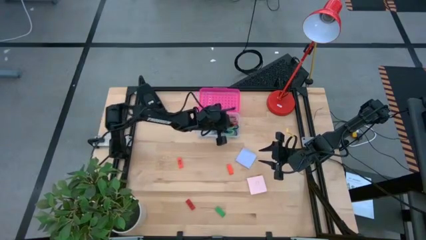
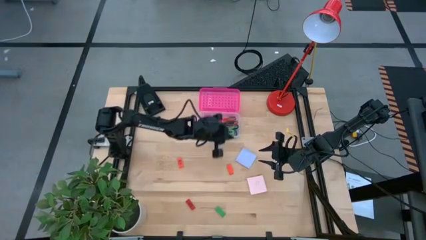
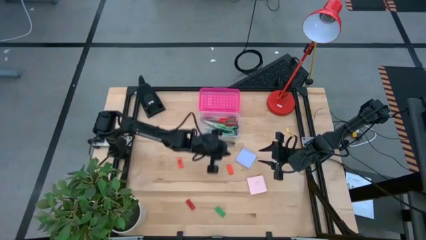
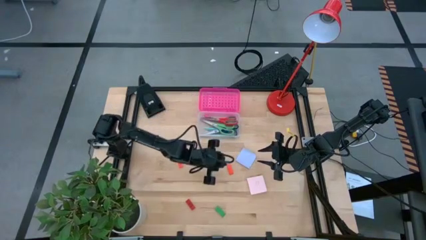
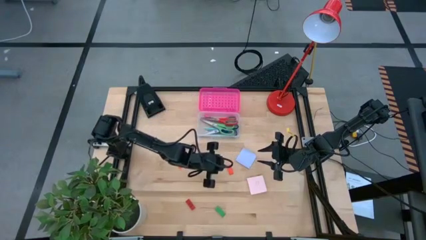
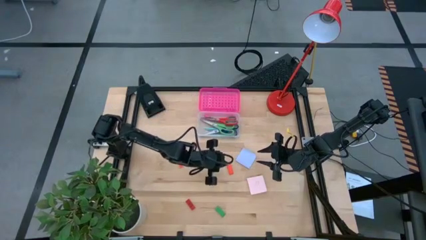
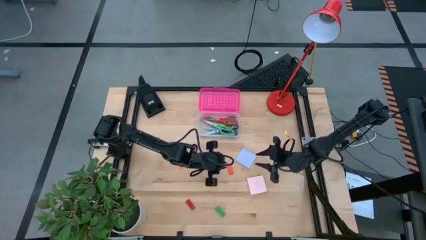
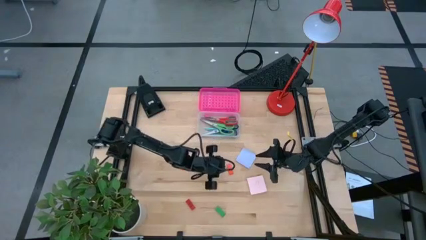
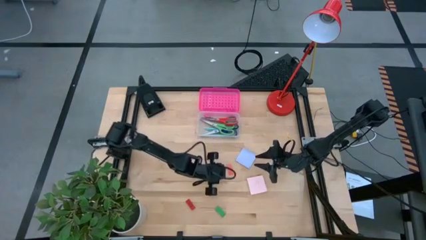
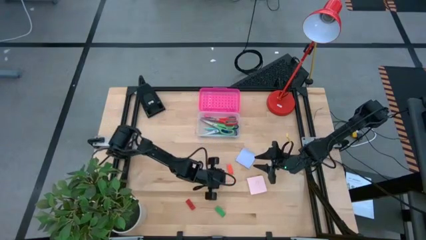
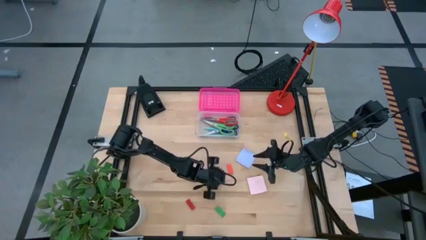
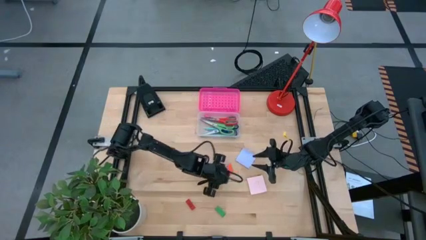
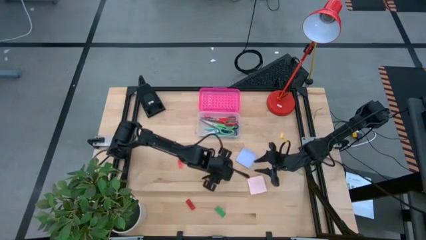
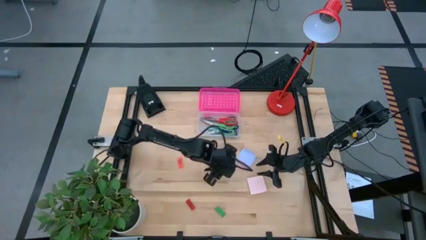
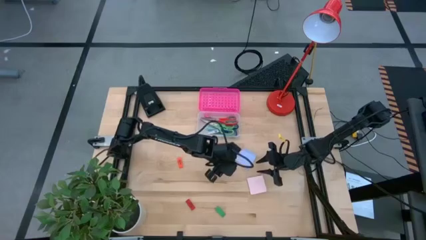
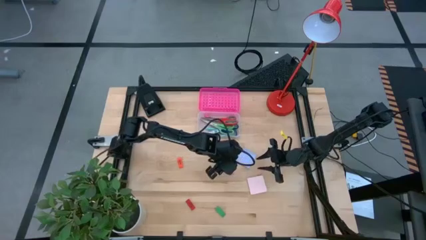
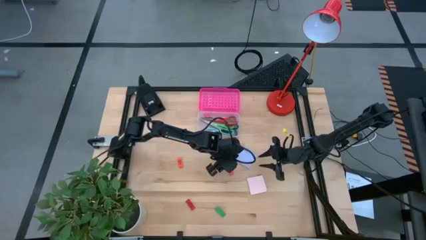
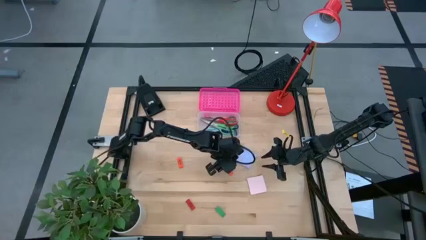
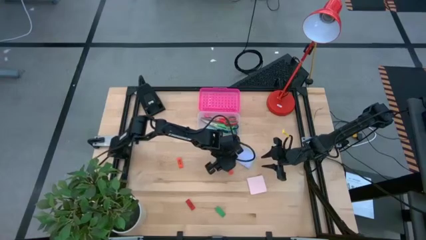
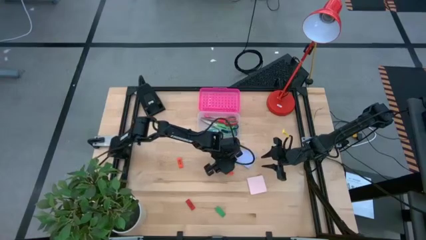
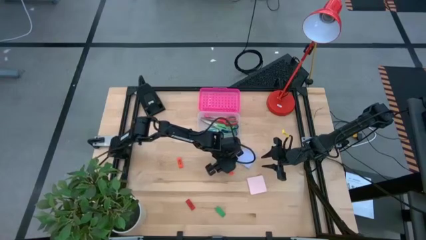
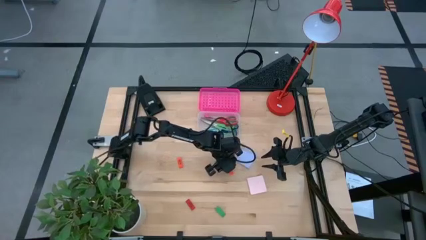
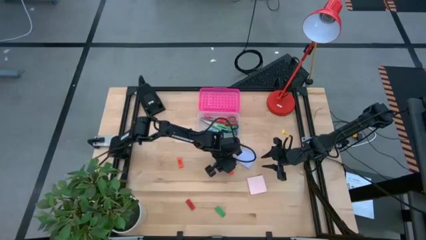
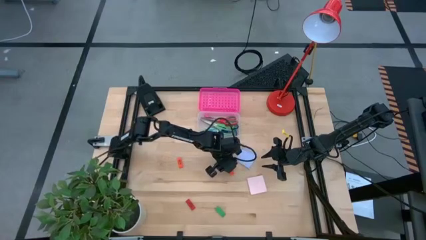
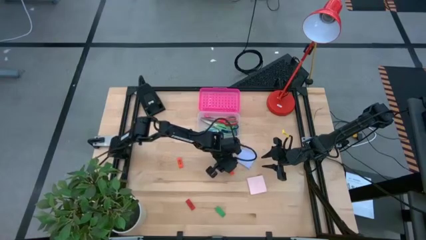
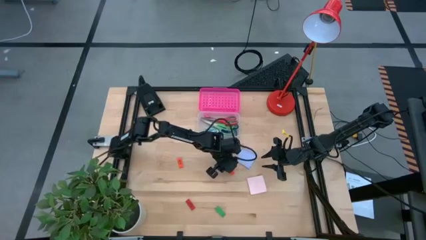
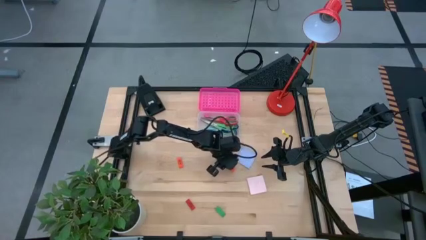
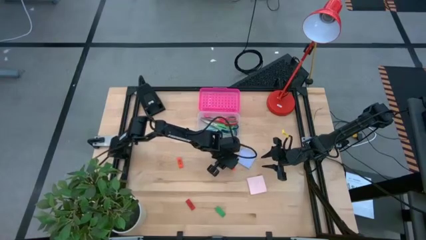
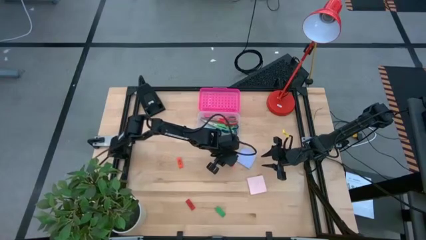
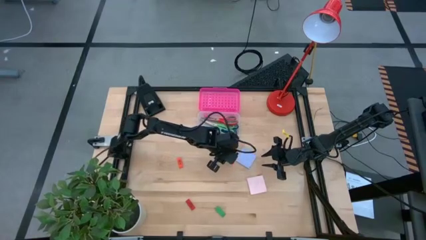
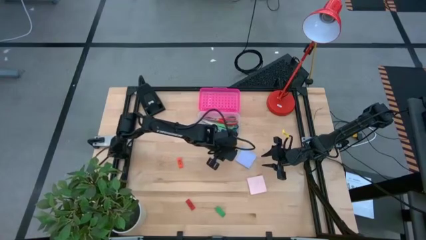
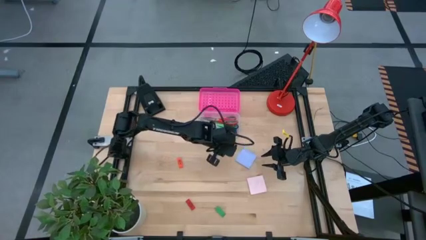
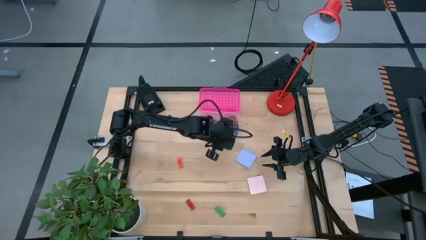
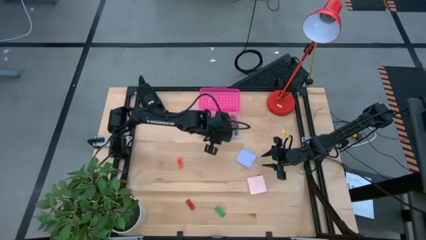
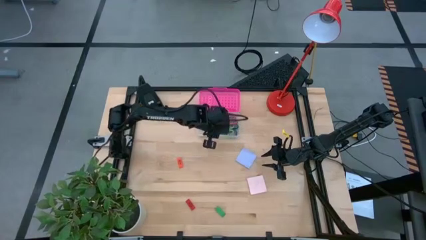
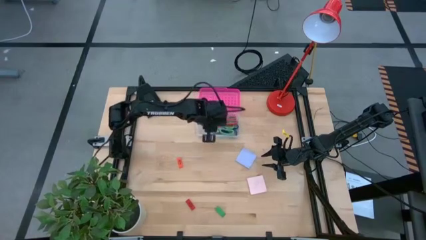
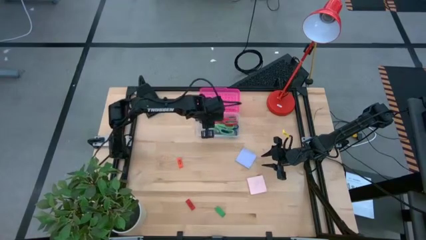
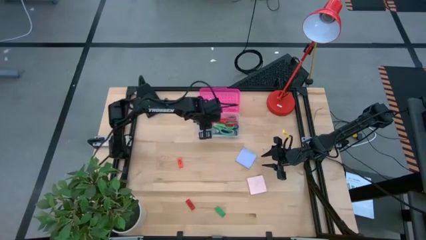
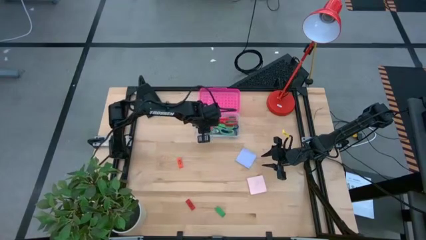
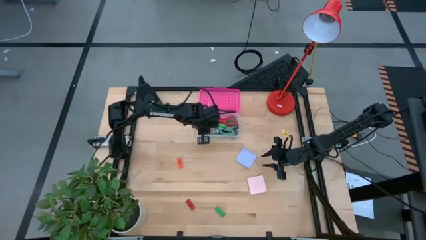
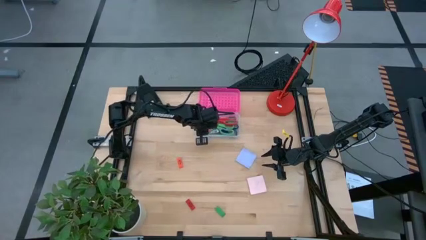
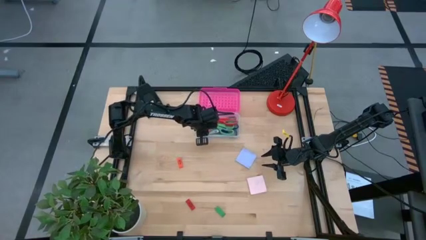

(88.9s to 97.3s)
Task: Pack school essentials
Put the right orange eraser into the supply box

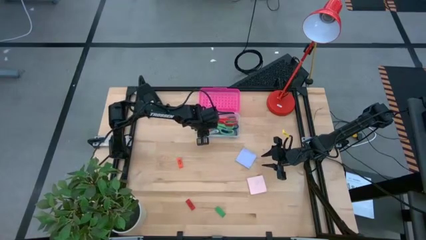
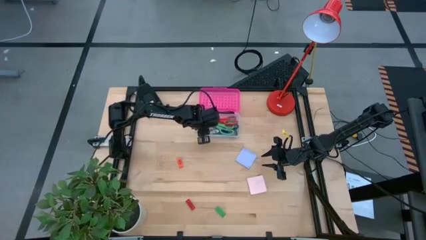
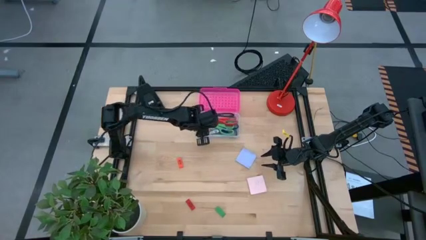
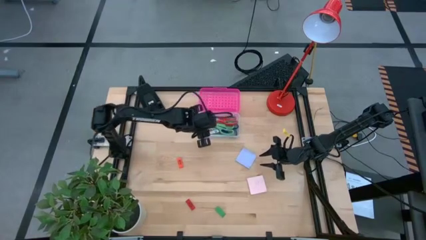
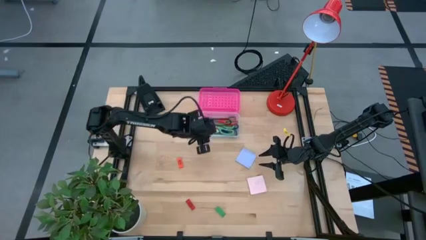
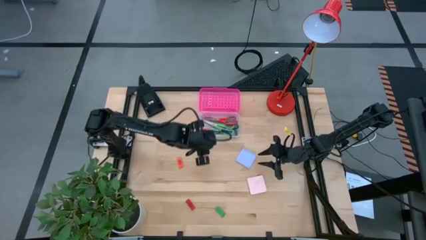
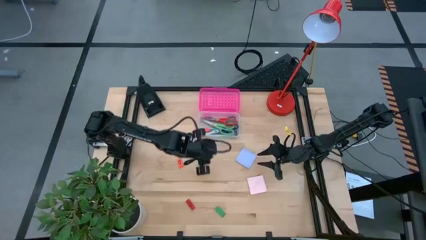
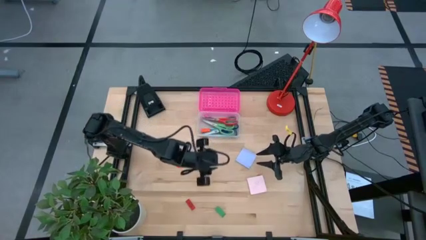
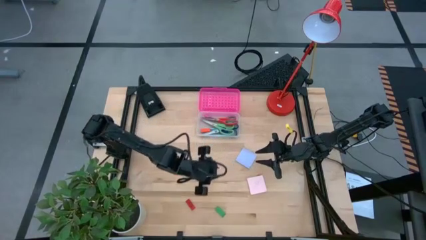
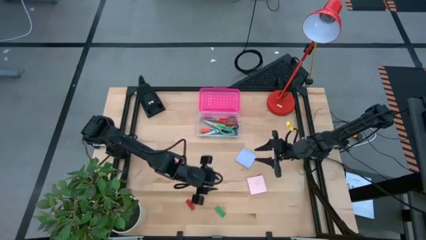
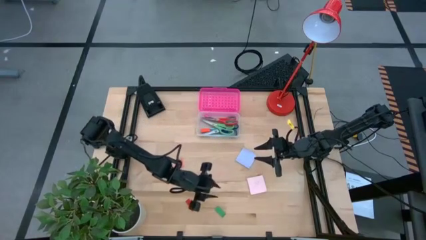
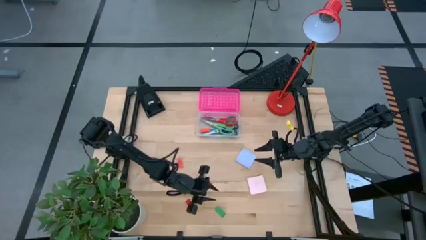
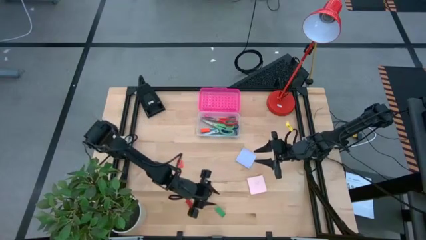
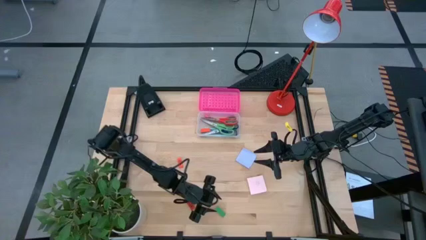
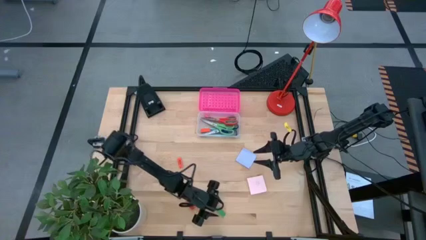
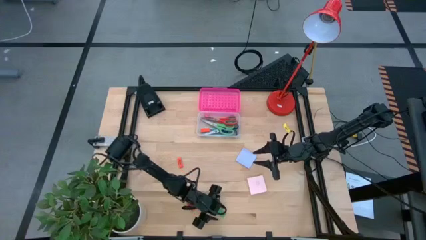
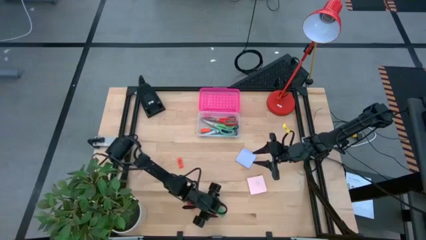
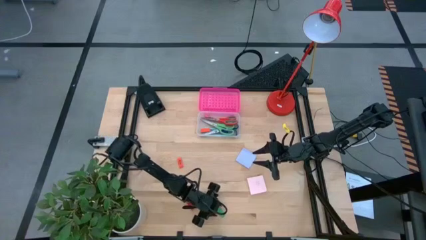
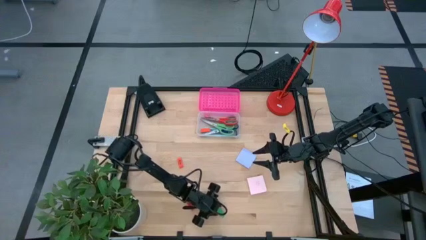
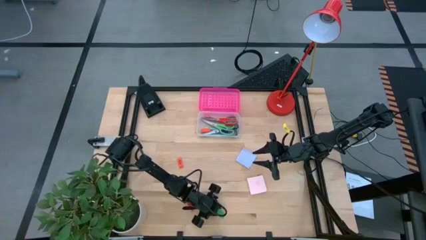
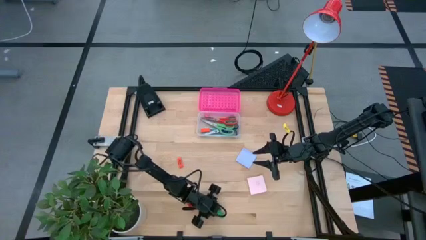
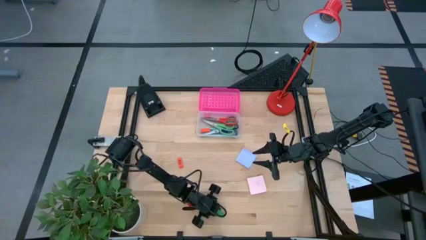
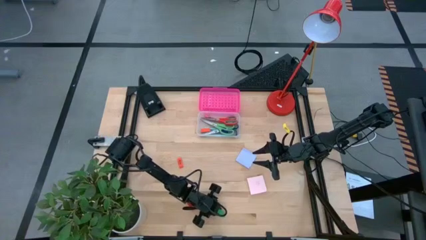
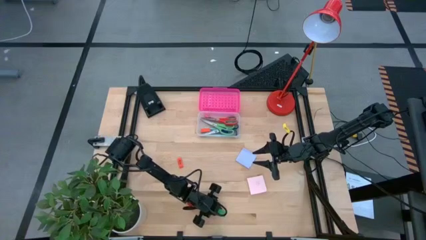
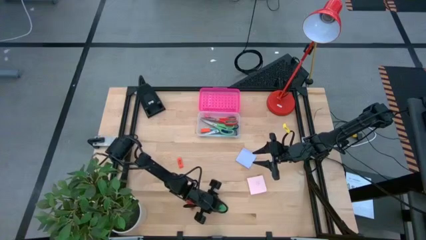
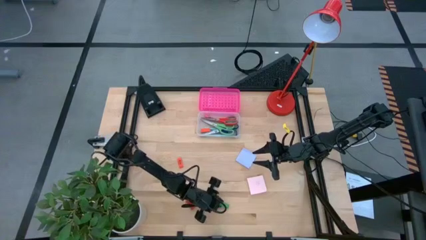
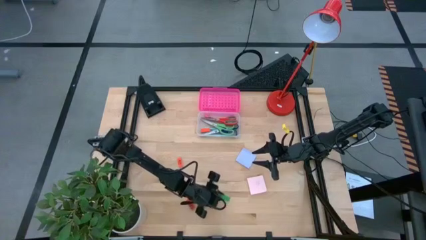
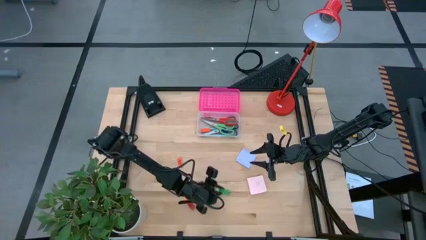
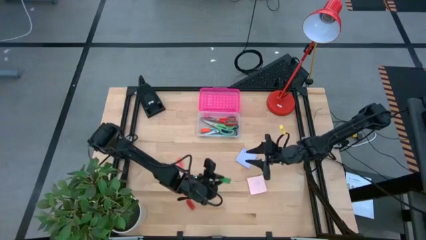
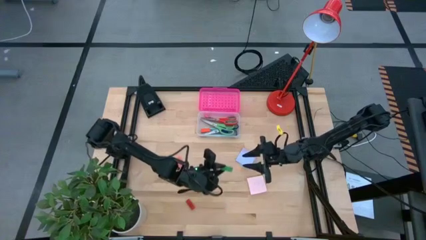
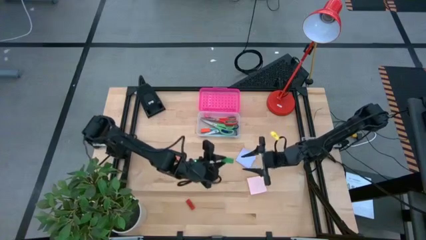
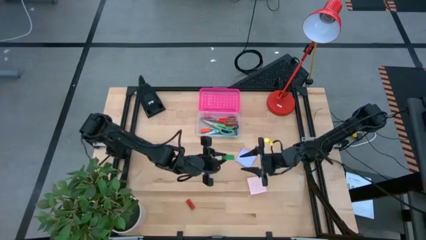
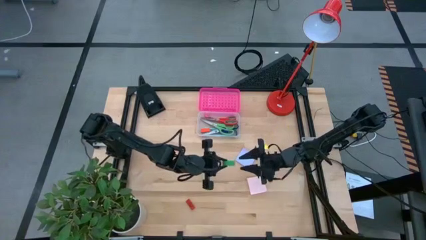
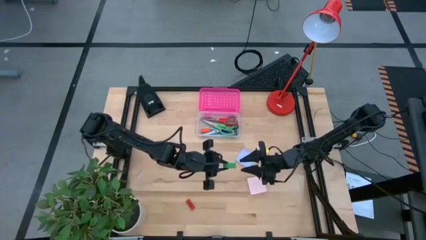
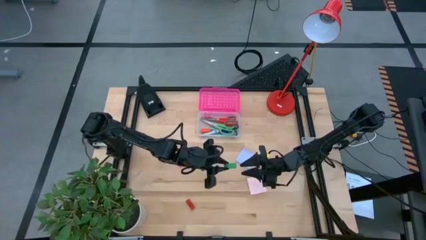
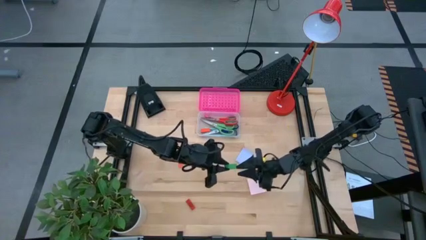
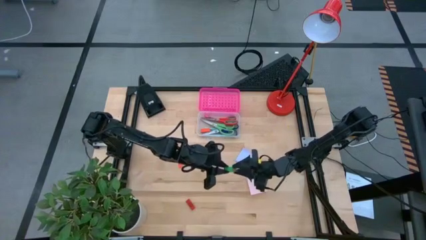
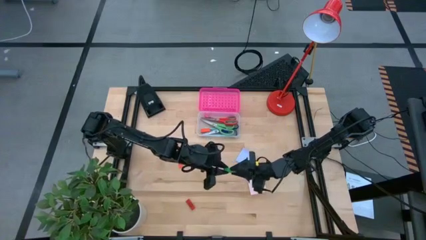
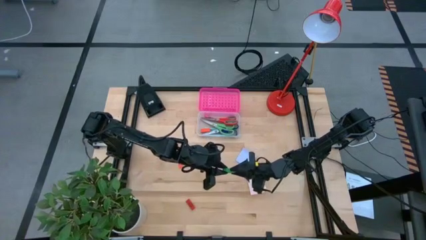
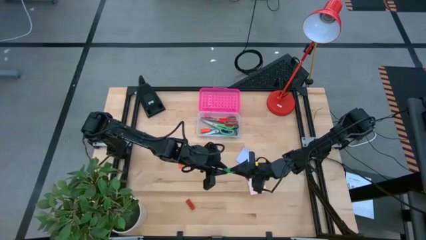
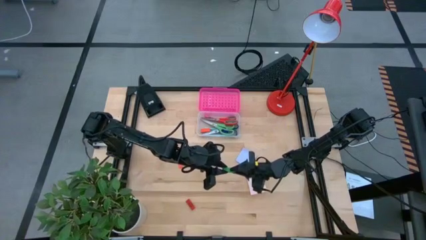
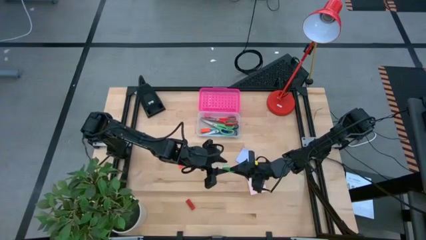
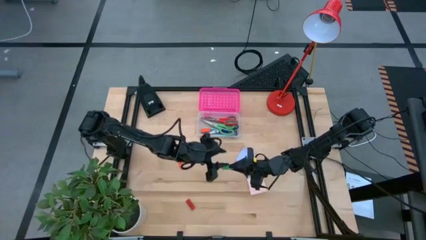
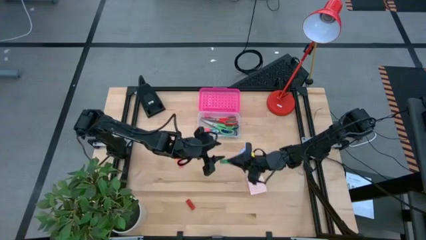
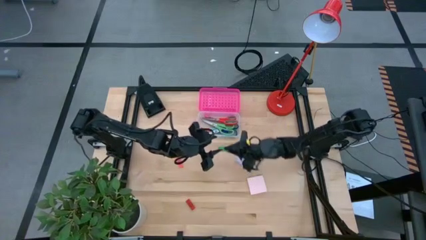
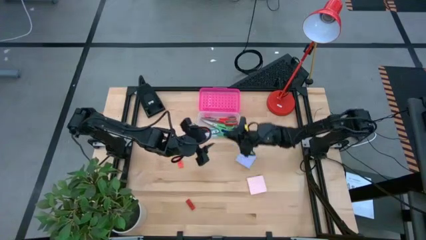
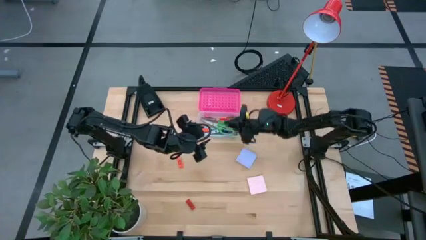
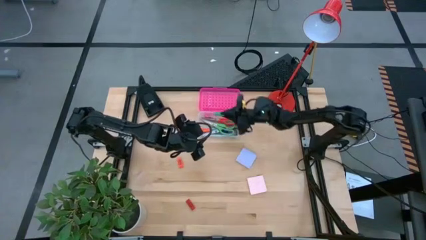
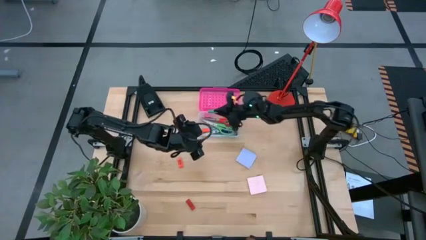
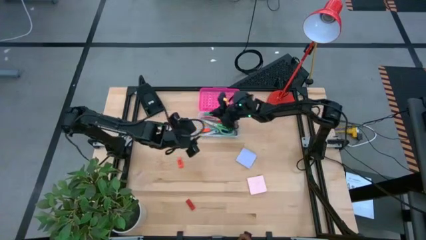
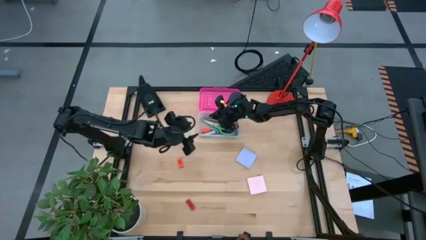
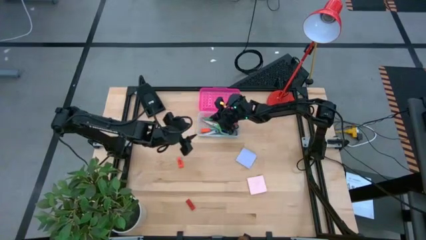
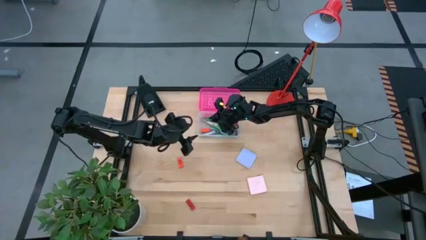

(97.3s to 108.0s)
Put the green eraser into the supply box
